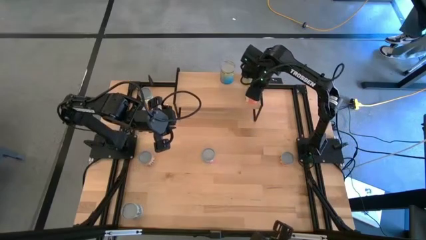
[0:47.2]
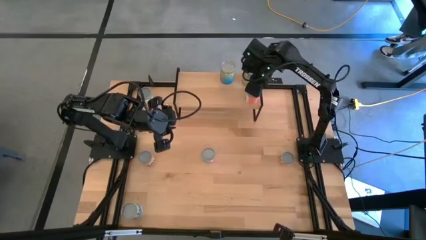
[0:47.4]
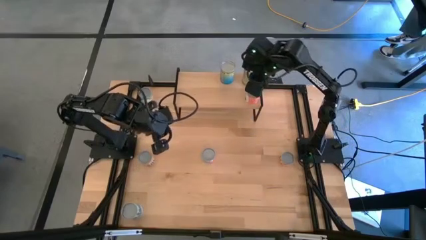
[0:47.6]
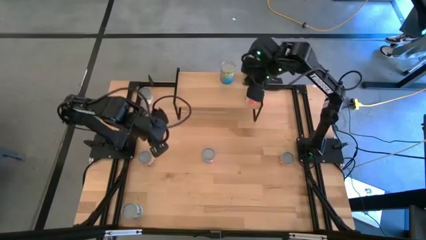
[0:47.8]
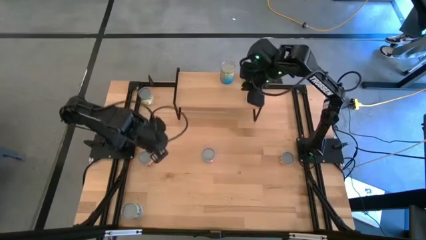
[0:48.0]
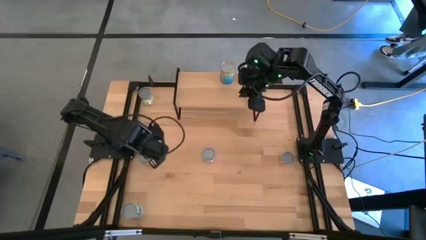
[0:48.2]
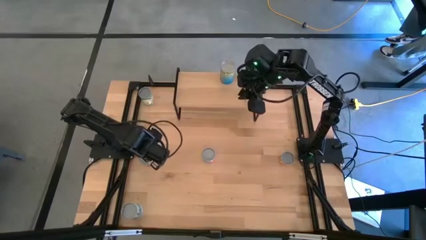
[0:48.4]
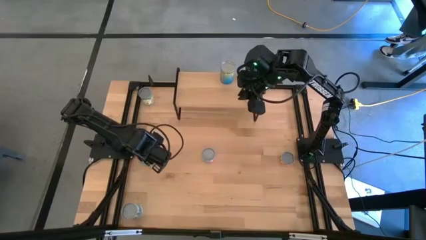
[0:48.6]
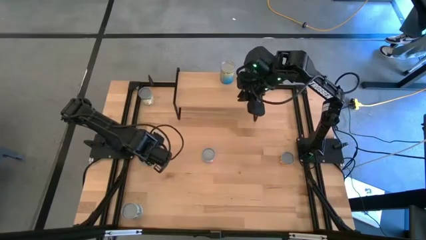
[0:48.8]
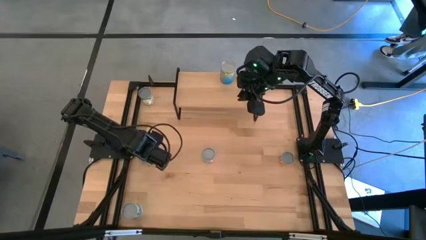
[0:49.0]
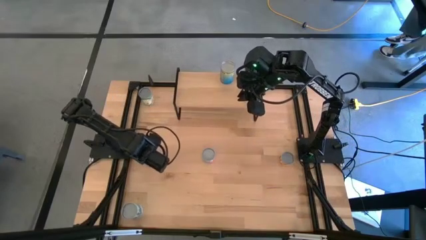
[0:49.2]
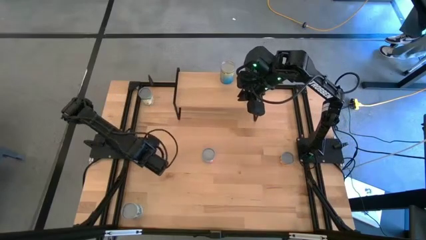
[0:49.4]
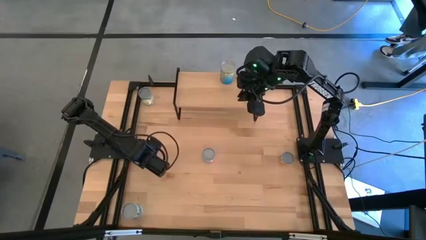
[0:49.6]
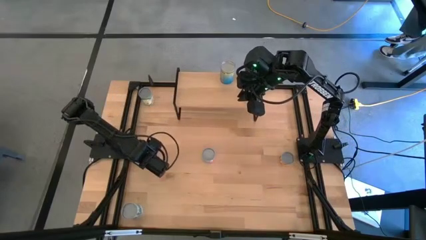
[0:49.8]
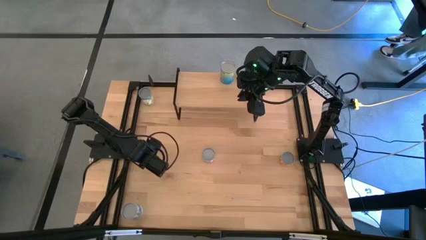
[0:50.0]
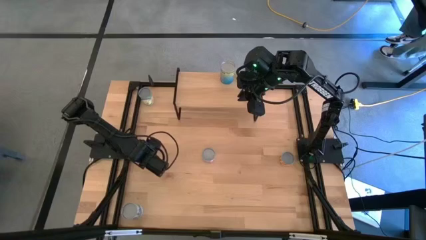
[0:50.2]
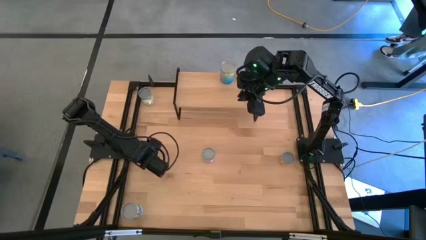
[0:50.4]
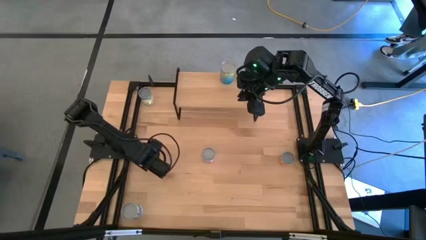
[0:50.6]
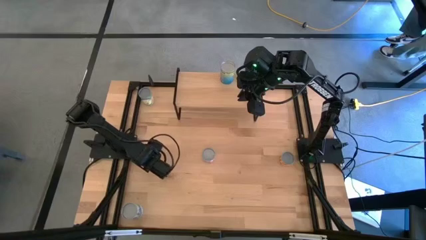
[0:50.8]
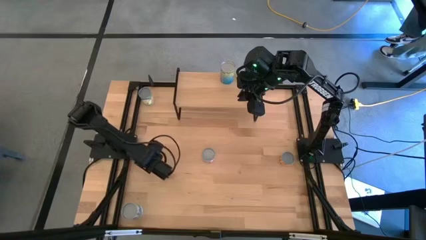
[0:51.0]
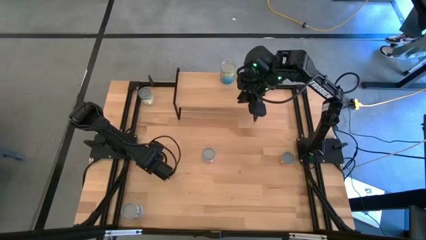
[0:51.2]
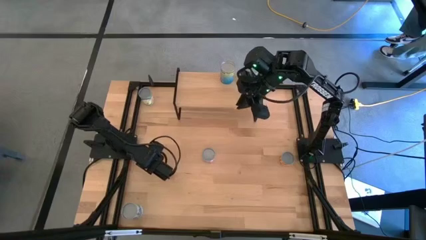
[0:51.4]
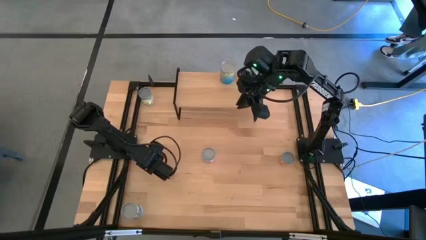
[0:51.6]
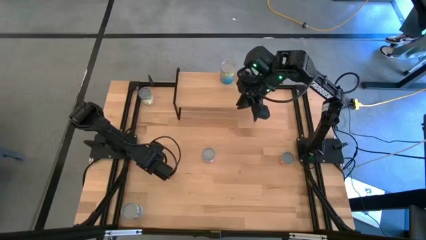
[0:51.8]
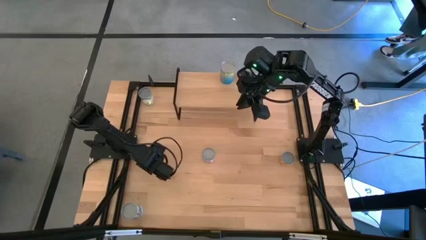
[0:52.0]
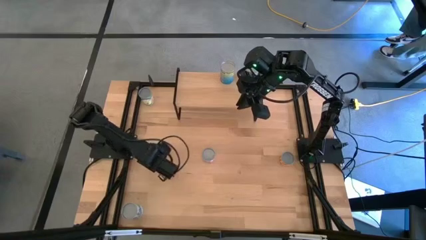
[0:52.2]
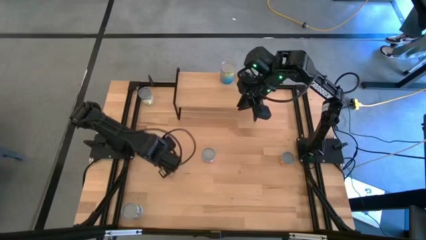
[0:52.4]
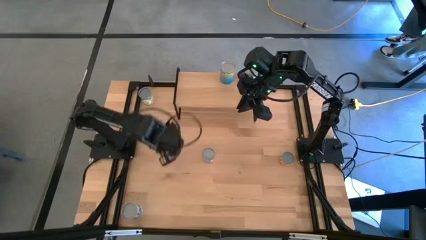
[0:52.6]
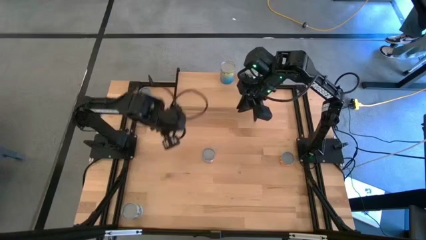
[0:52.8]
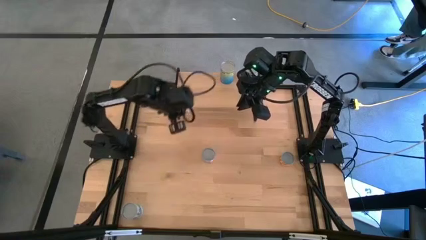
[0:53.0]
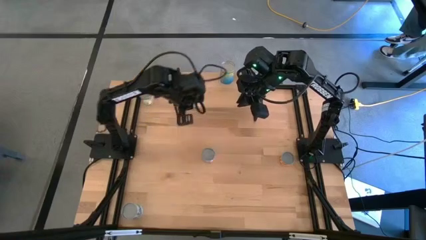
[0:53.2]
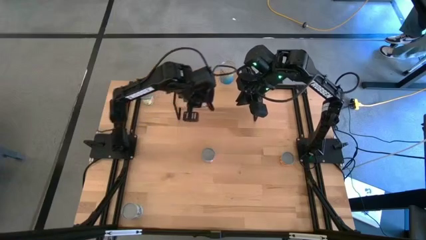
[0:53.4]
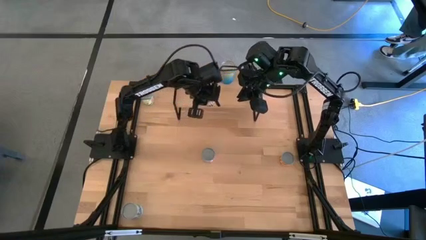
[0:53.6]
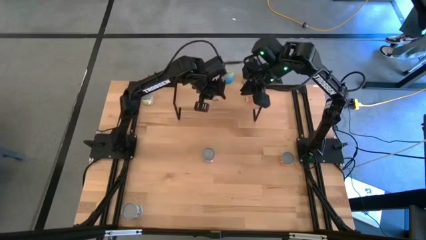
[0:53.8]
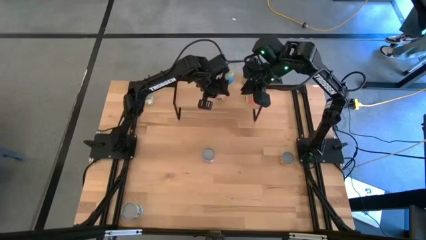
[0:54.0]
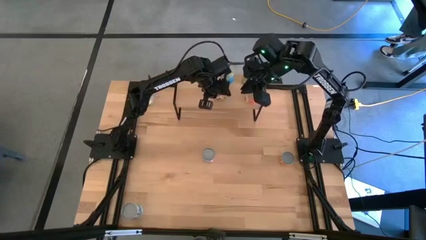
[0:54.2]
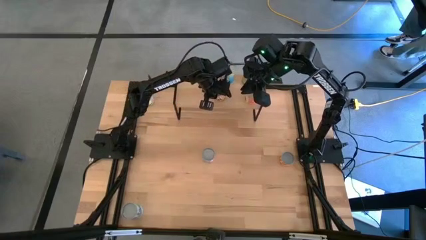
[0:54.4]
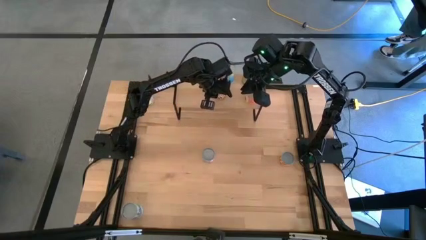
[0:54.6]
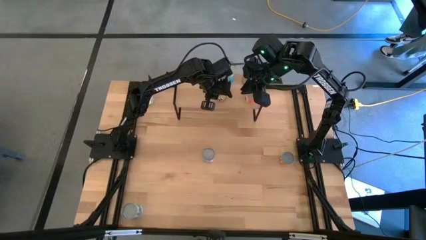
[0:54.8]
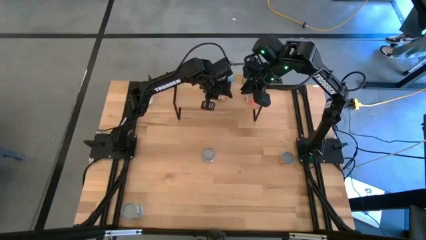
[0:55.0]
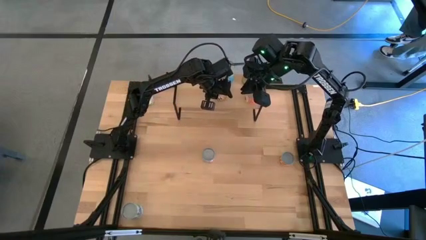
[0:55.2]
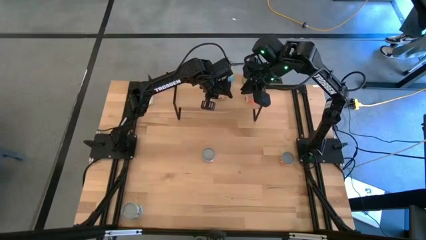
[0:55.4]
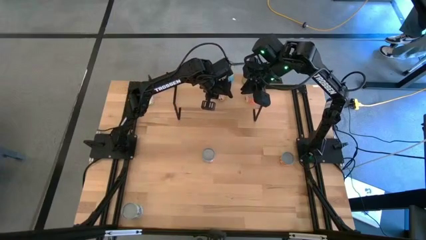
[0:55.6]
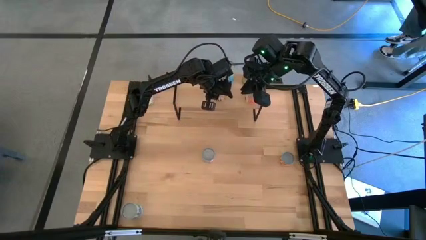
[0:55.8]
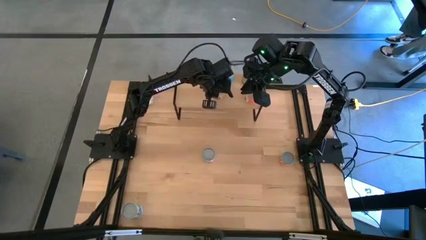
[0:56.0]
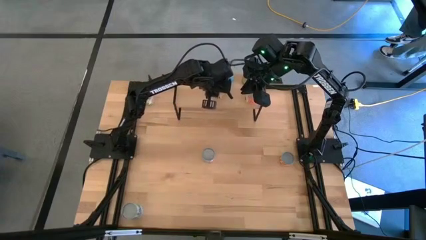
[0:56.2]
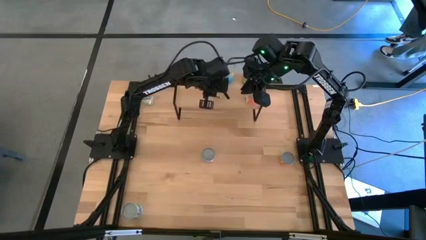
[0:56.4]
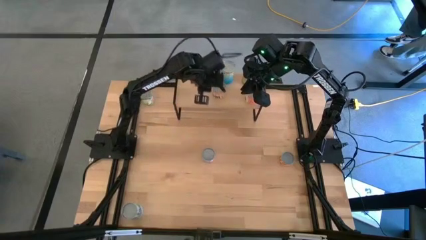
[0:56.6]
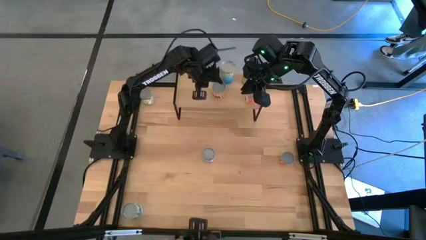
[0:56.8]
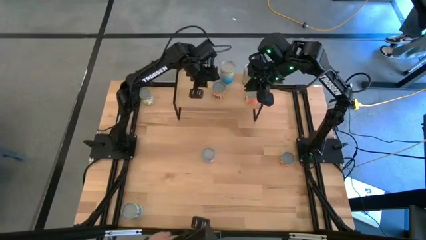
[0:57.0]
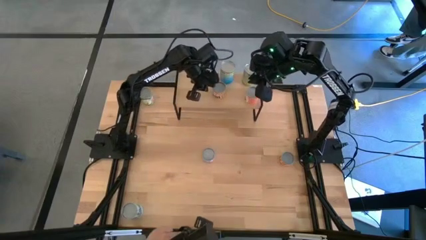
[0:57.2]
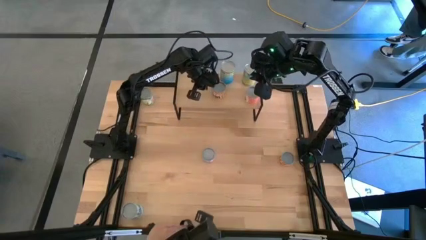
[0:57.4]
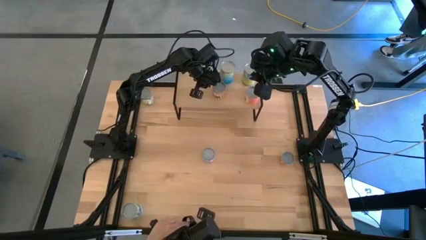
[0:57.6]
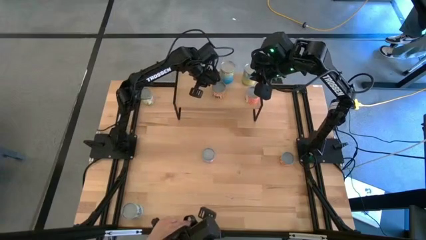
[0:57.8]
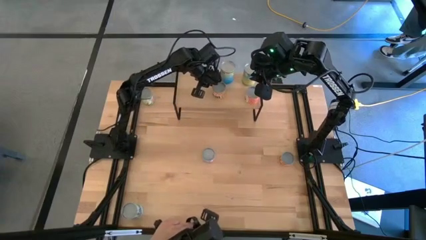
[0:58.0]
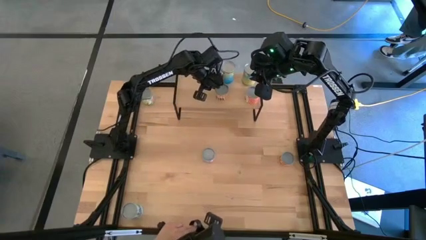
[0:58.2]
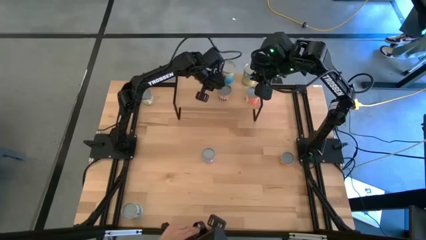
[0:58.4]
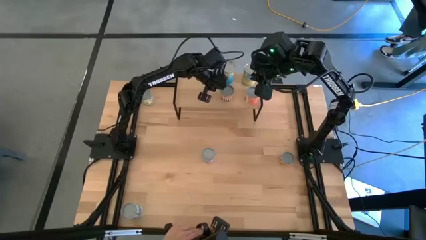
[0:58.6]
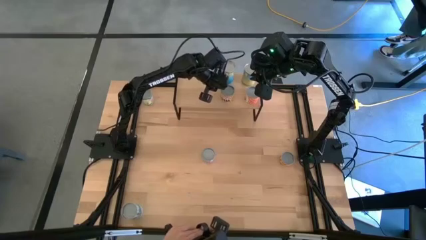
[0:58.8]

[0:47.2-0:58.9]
Task: Pick and place cans onto a shelf
Put the canned black beans on the shelf
